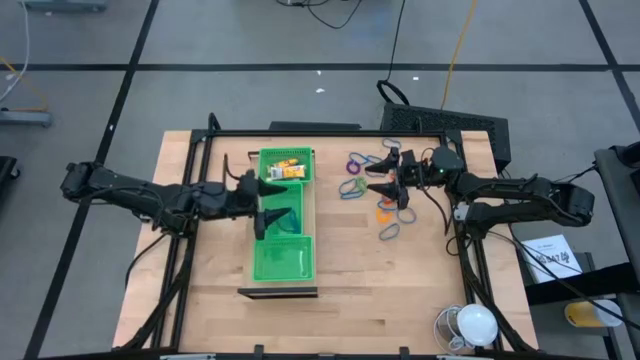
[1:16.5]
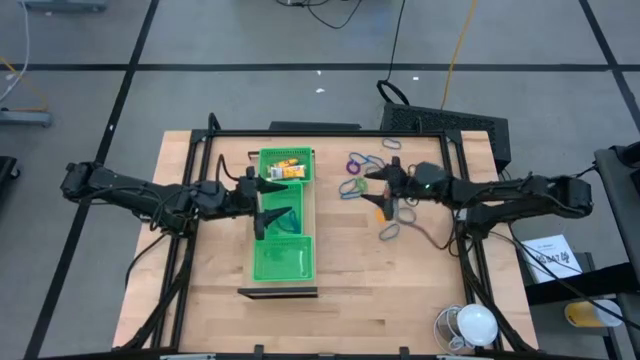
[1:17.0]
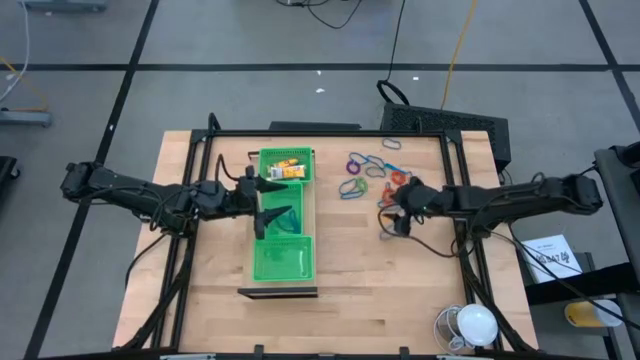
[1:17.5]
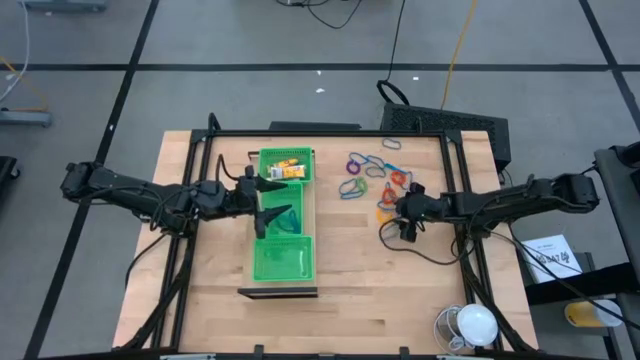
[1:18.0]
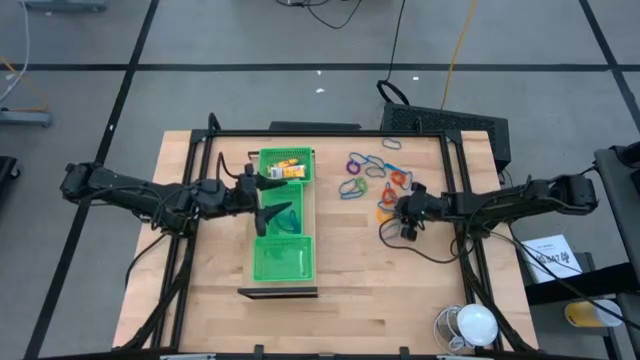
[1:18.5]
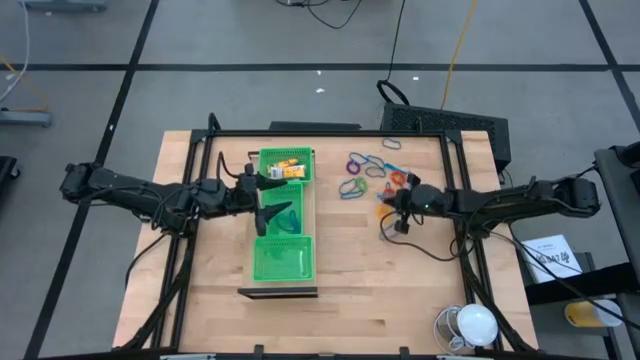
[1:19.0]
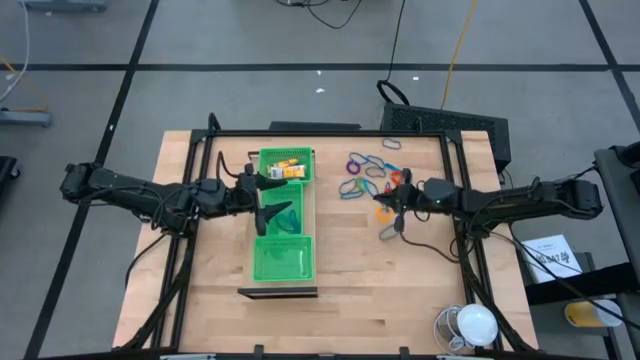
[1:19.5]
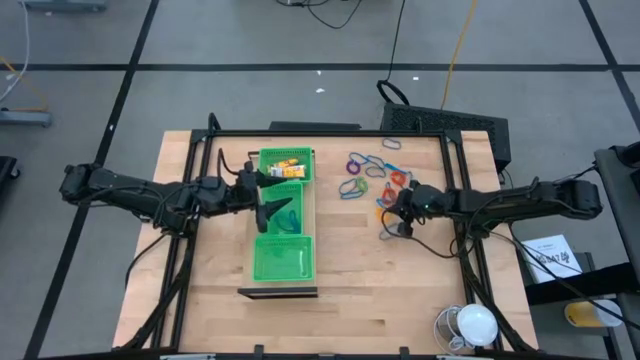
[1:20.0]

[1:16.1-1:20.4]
Task: Pick & Place Office Desk Supplies
Put the blue rubber band into the center green bin on the shelf

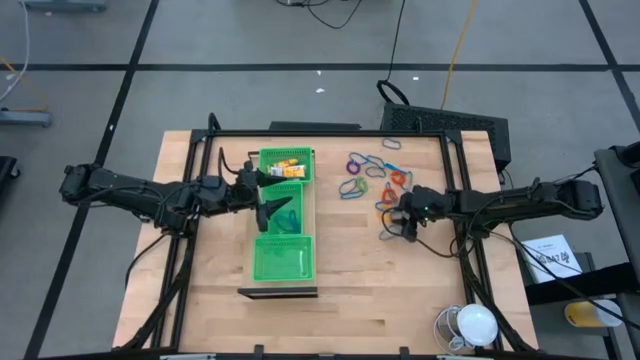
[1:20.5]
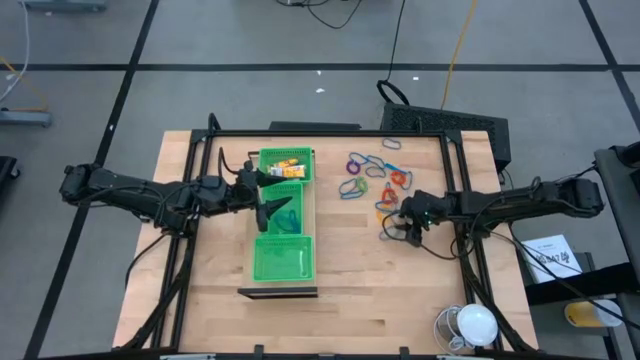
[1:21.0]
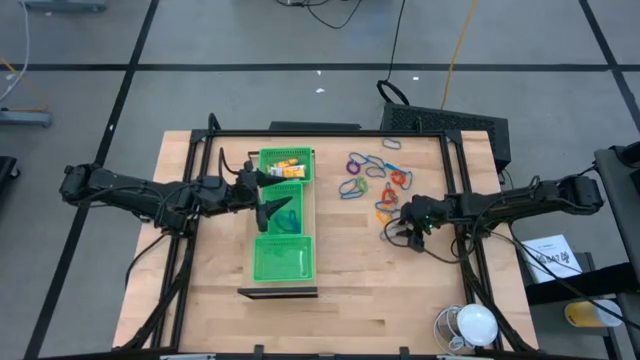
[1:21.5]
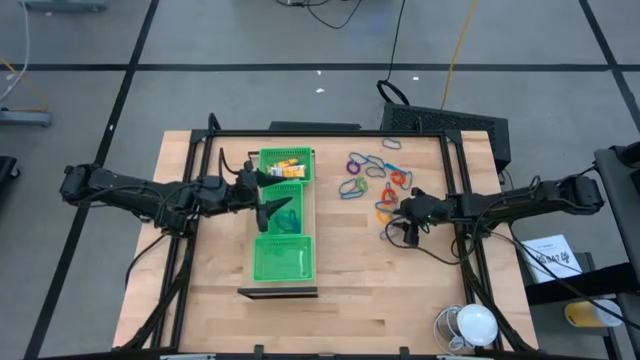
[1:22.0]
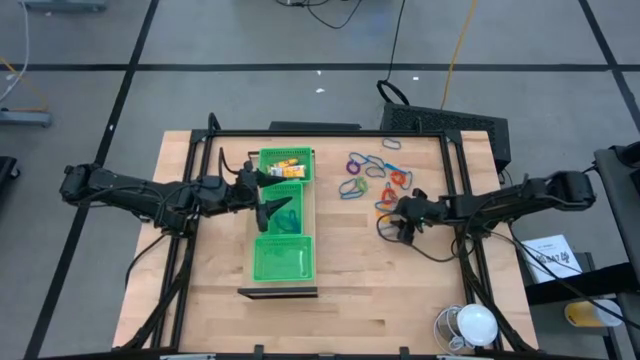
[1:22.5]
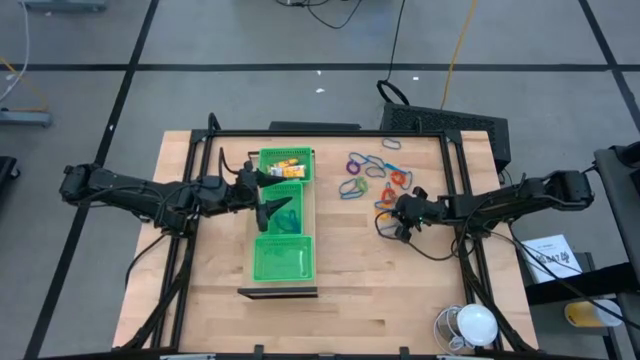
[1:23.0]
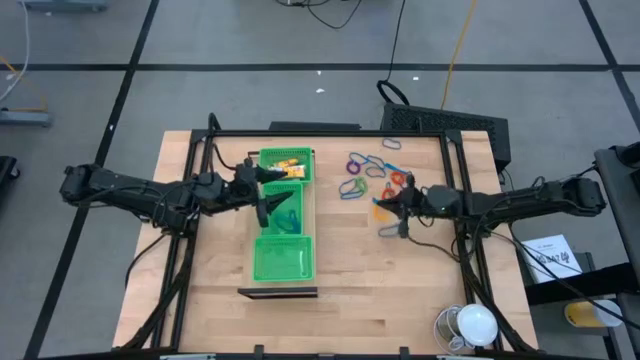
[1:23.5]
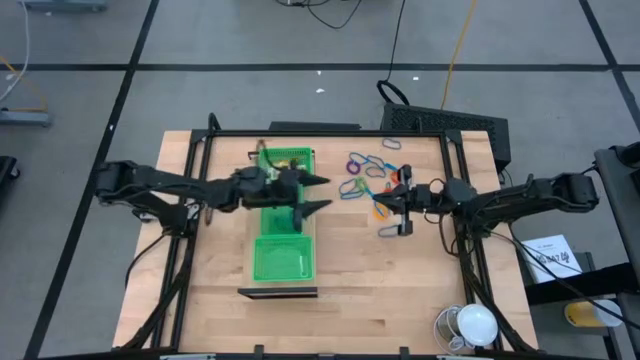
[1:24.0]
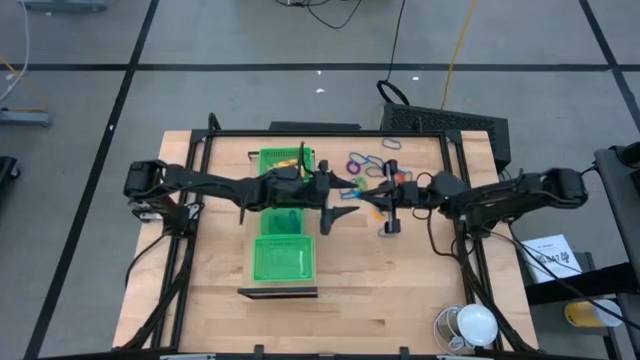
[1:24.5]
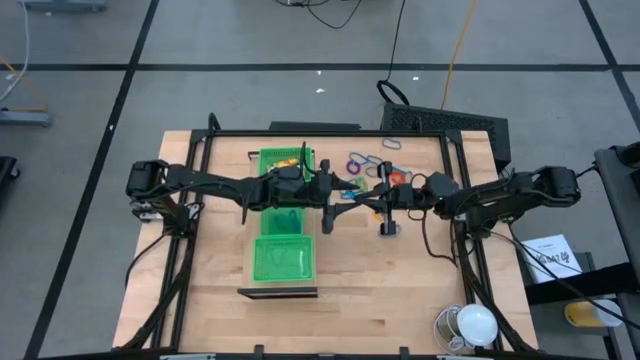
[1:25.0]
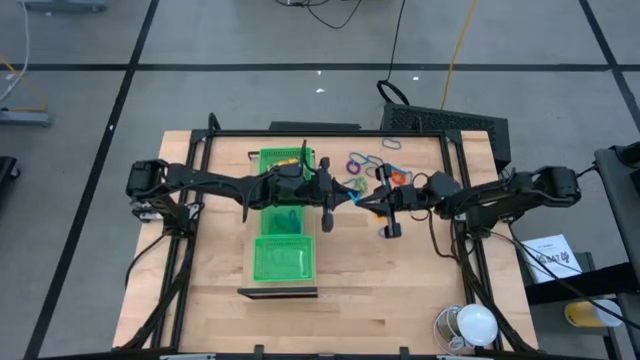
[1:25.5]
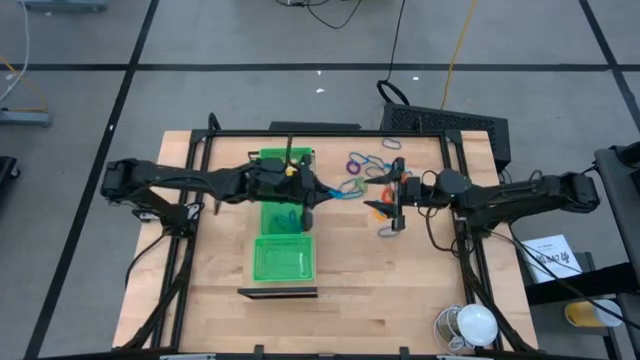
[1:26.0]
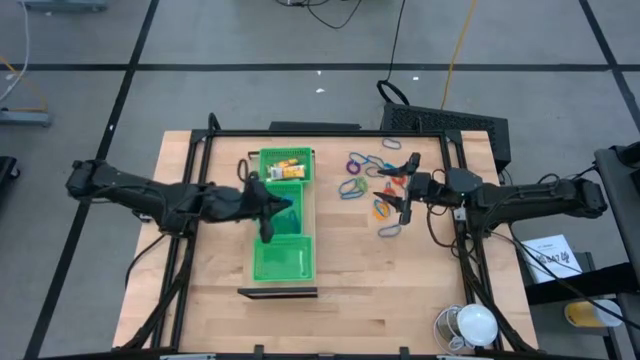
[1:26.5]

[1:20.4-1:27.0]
Put the blue rubber band into the center green bin on the shelf

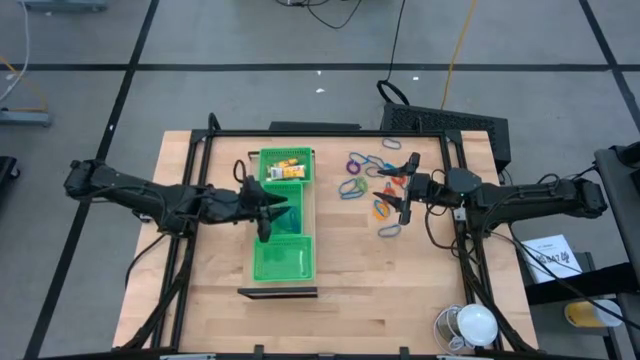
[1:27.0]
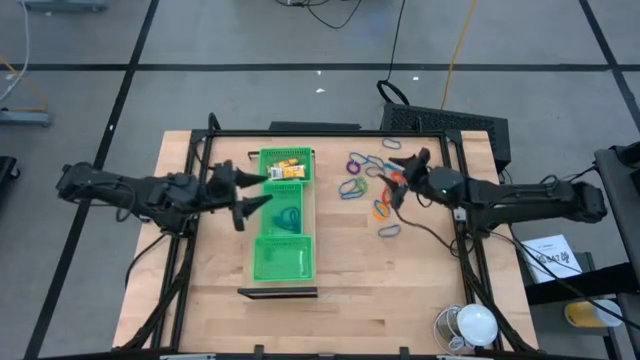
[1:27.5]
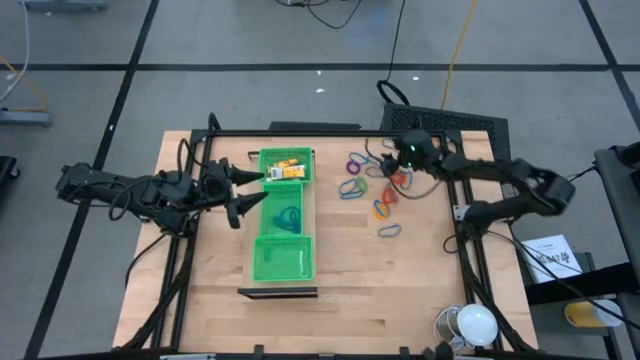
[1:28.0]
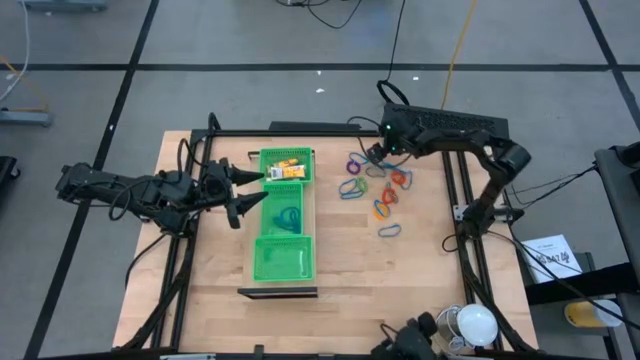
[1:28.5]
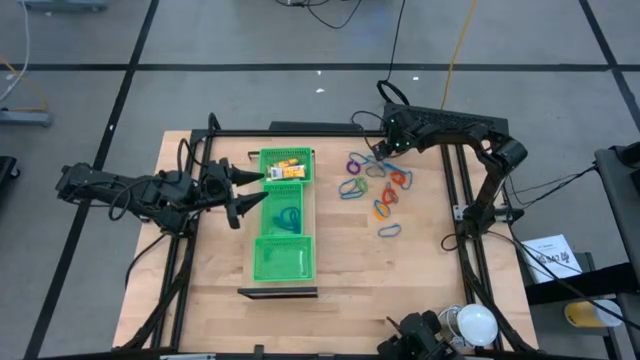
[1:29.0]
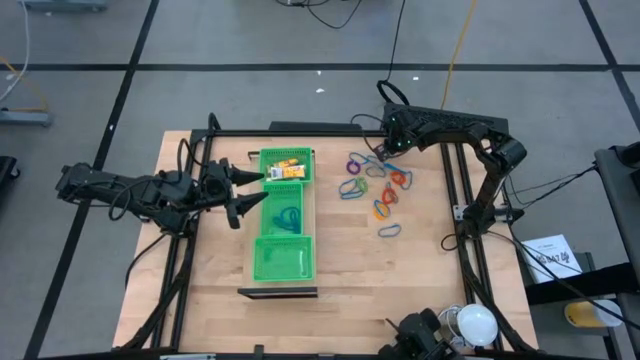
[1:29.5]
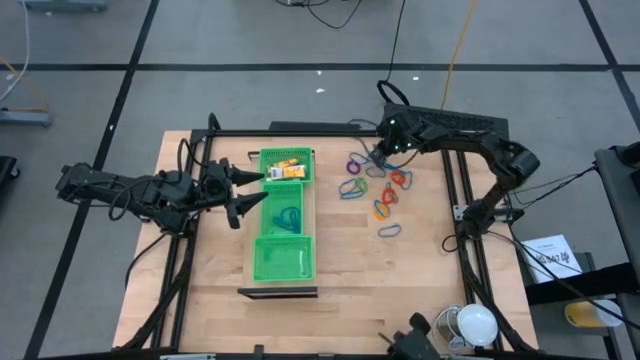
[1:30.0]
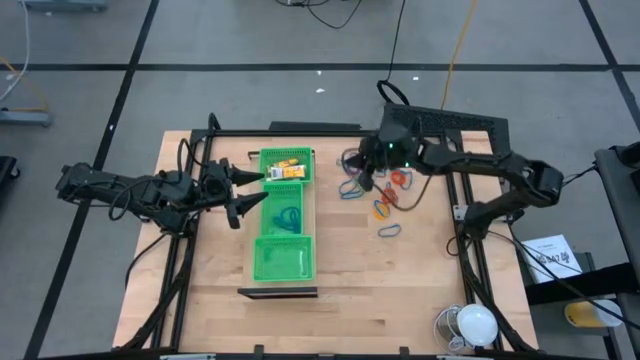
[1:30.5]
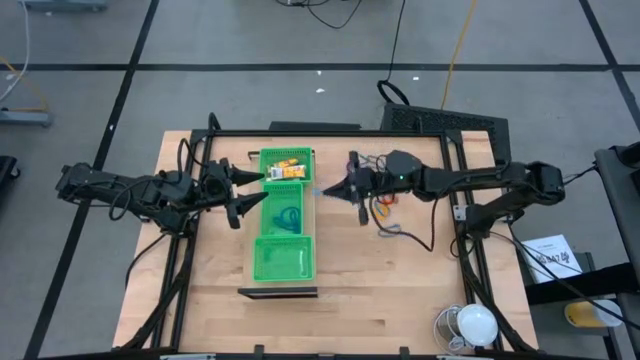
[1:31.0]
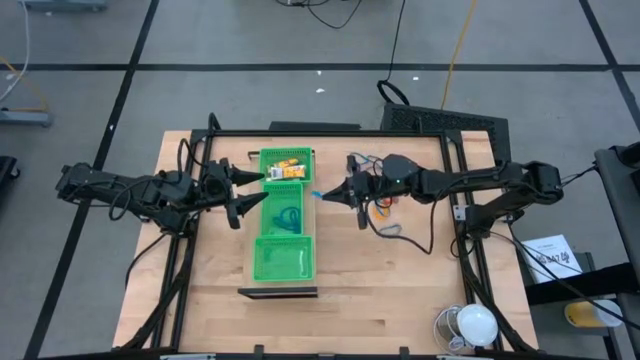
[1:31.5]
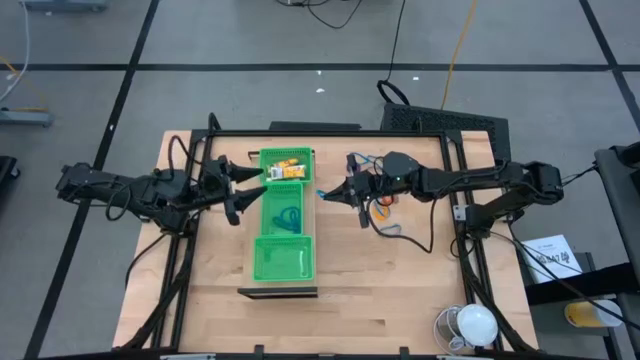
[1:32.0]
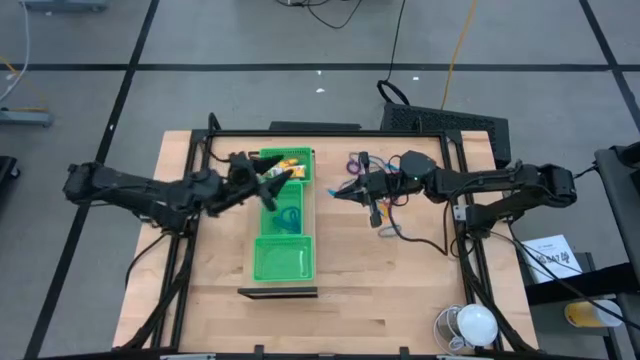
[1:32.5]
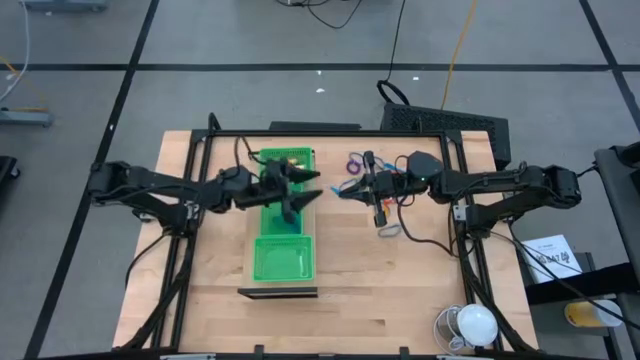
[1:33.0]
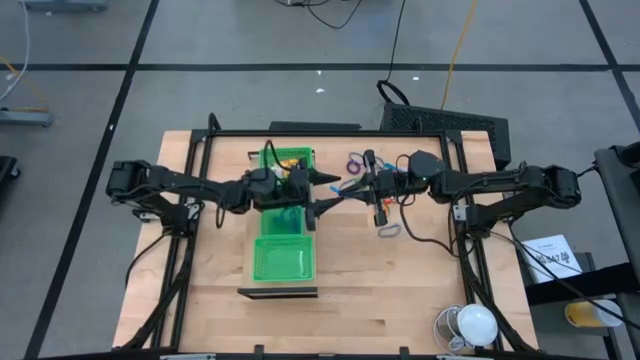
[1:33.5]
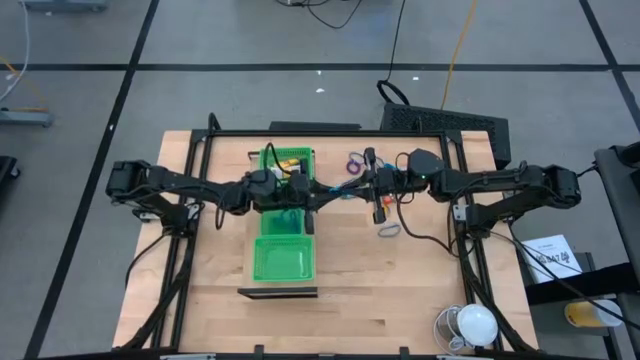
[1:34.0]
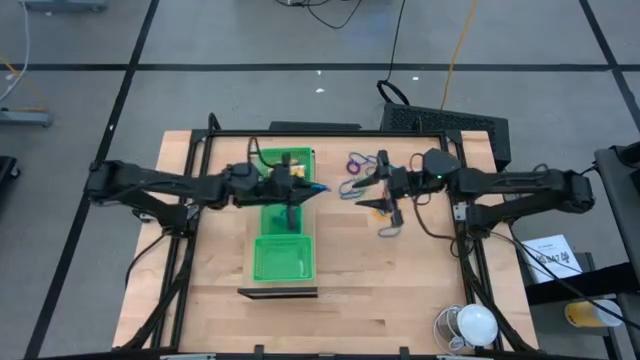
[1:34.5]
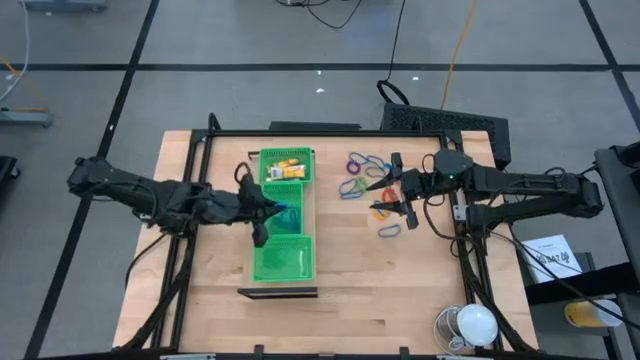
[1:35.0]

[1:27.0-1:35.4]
Put the blue rubber band into the center green bin on the shelf

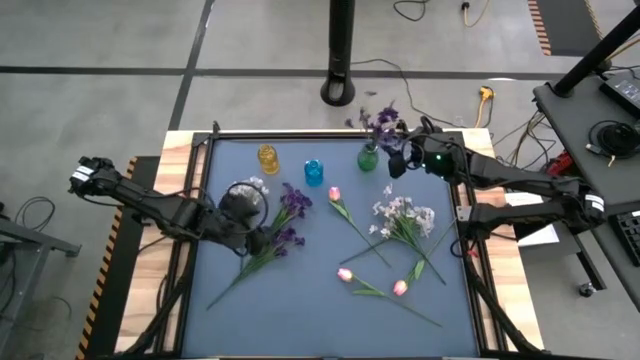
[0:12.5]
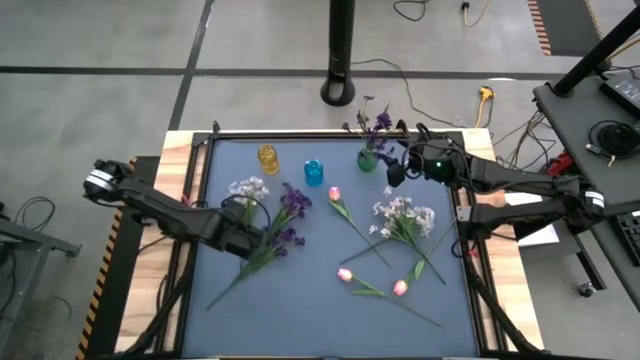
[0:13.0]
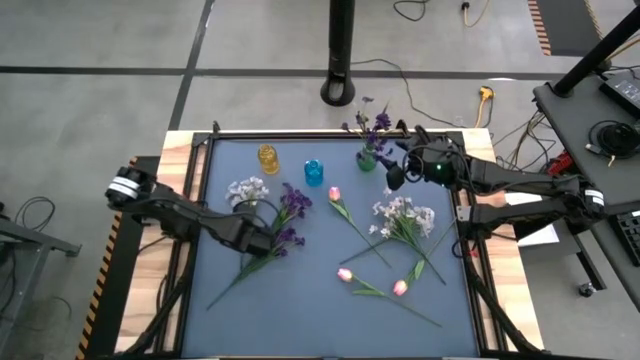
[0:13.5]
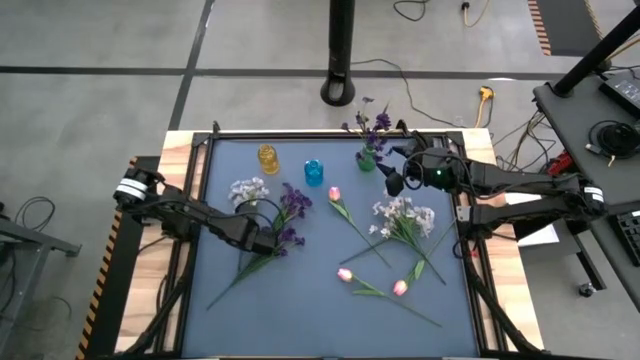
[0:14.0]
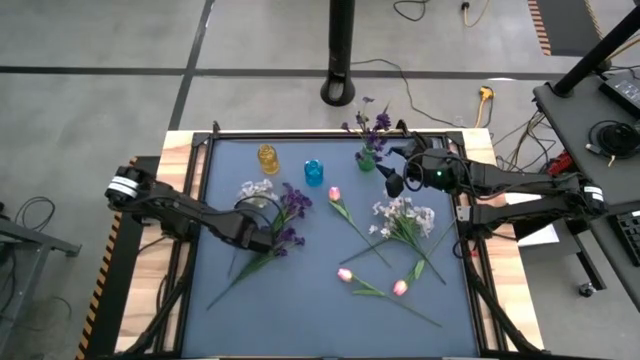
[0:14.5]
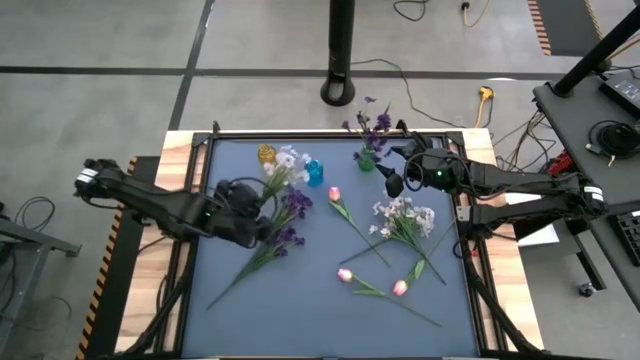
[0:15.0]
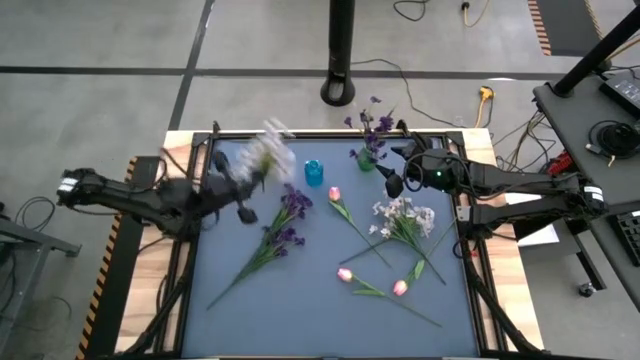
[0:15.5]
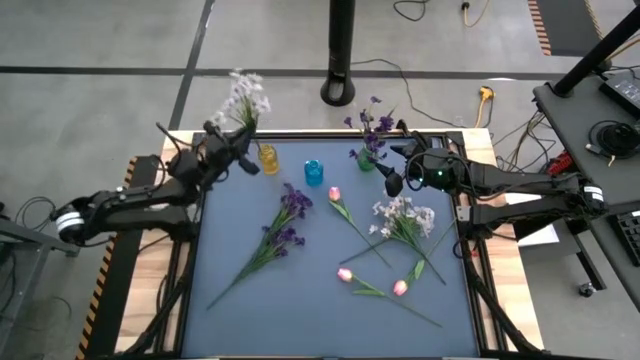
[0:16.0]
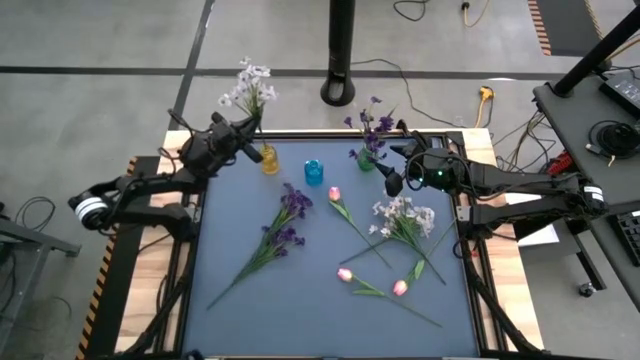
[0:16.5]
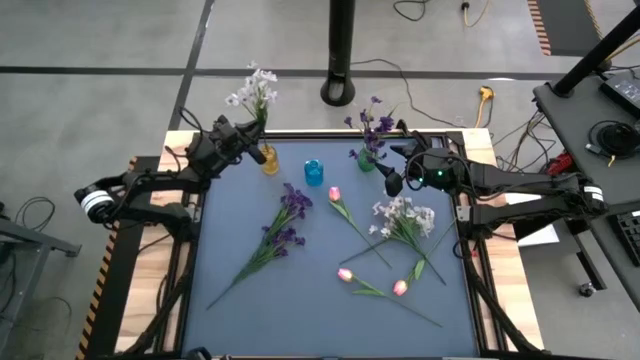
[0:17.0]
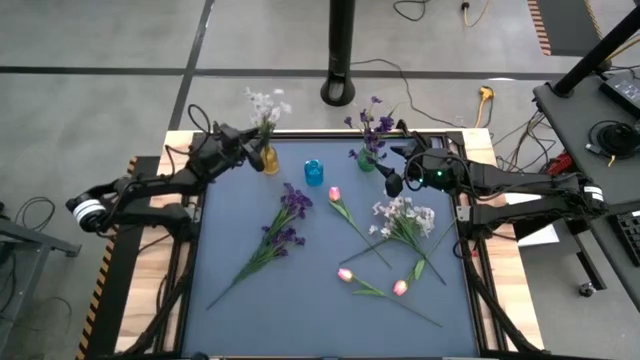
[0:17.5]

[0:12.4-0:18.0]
Task: Sort flowers into vase by color
Put the left white flower into the yellow vase
